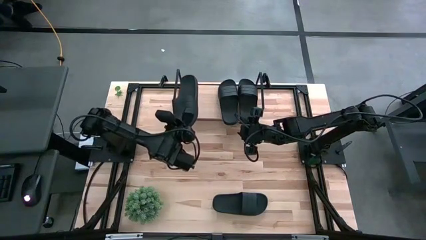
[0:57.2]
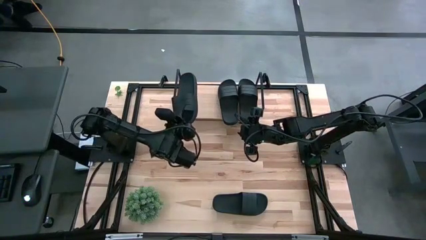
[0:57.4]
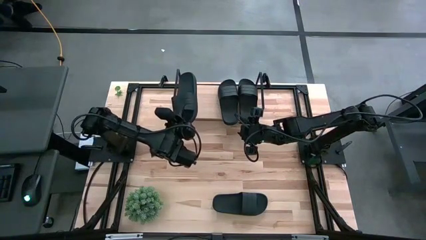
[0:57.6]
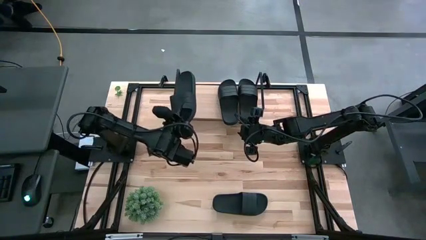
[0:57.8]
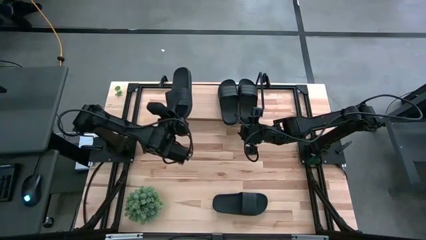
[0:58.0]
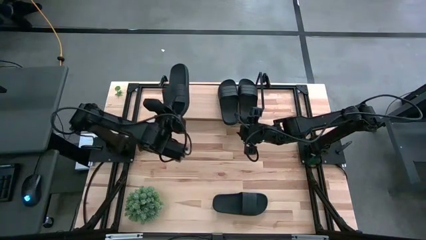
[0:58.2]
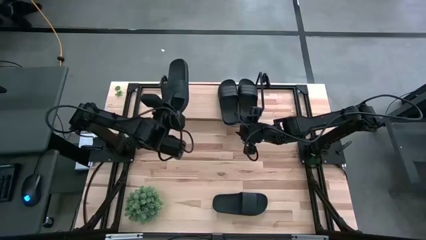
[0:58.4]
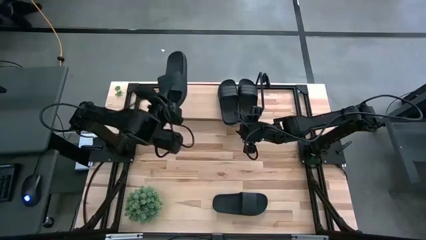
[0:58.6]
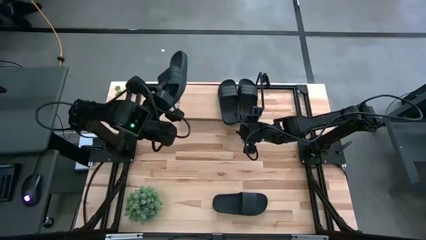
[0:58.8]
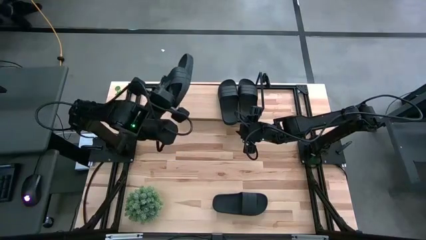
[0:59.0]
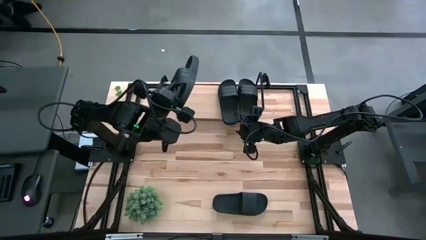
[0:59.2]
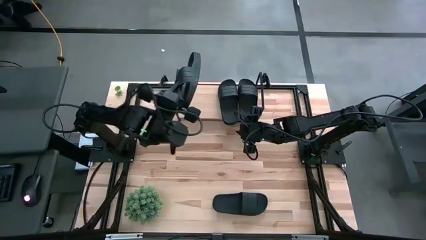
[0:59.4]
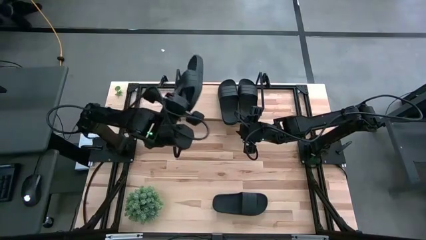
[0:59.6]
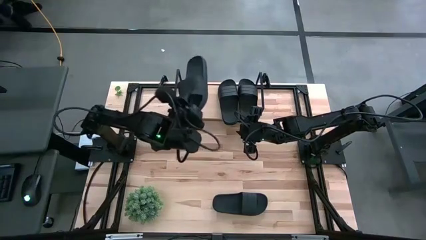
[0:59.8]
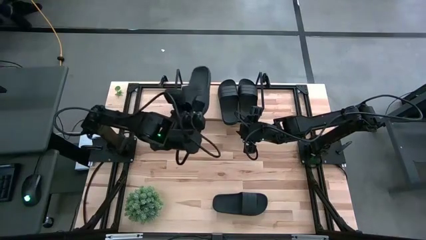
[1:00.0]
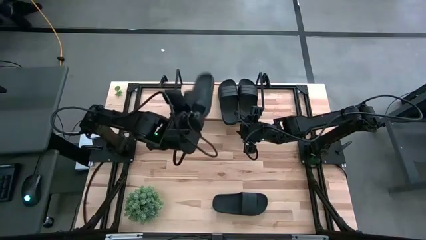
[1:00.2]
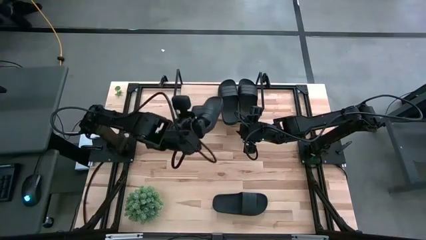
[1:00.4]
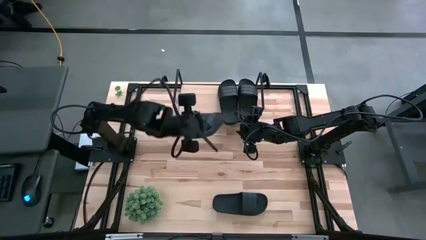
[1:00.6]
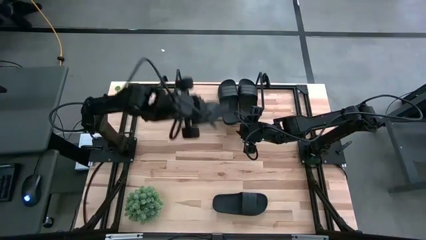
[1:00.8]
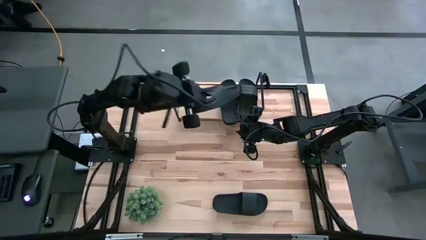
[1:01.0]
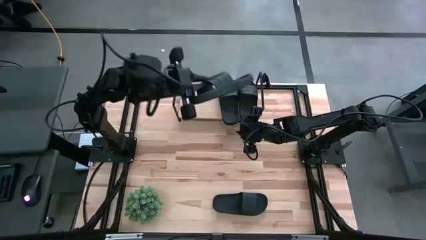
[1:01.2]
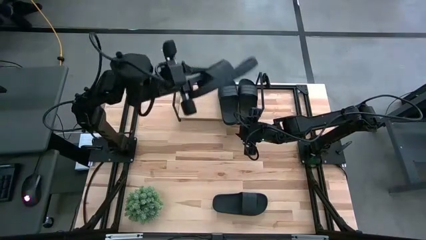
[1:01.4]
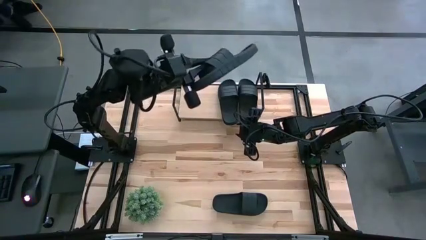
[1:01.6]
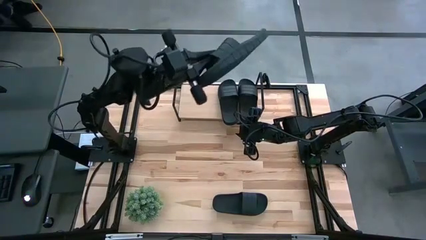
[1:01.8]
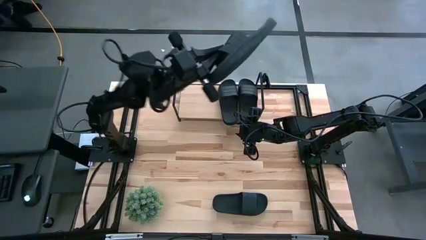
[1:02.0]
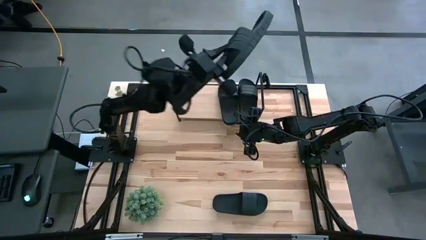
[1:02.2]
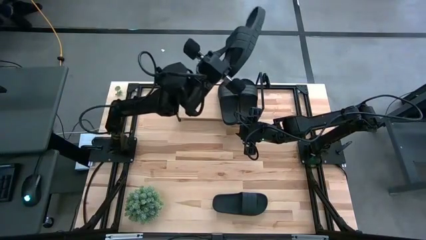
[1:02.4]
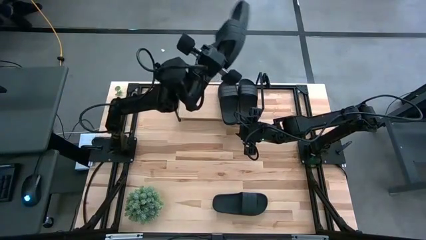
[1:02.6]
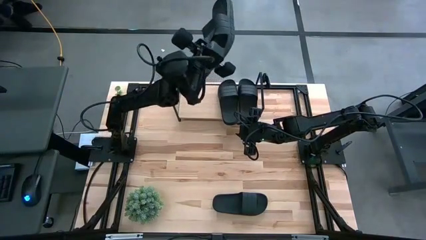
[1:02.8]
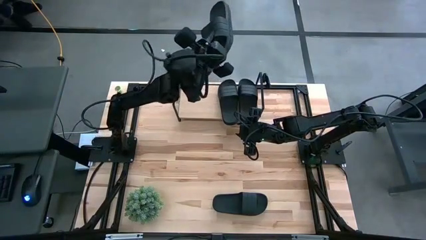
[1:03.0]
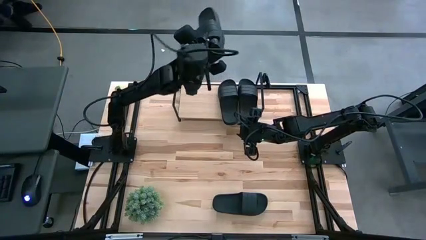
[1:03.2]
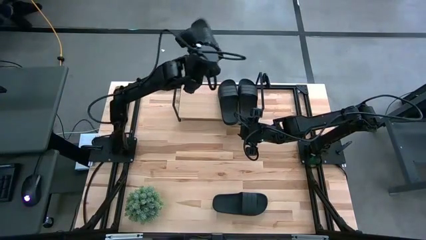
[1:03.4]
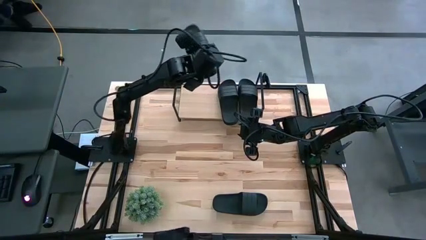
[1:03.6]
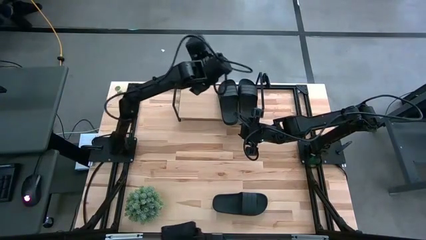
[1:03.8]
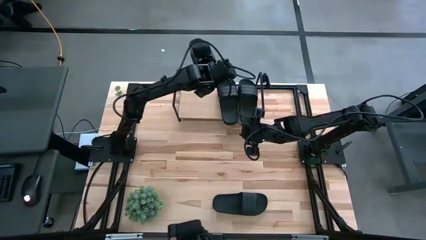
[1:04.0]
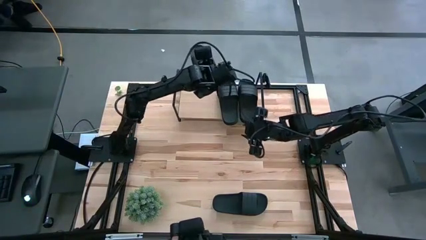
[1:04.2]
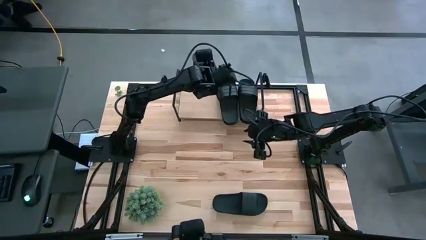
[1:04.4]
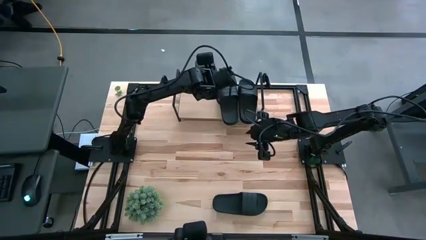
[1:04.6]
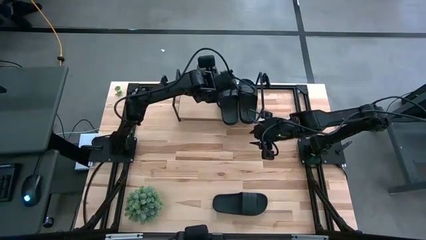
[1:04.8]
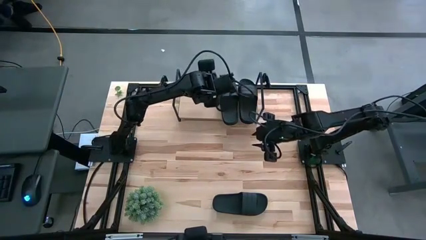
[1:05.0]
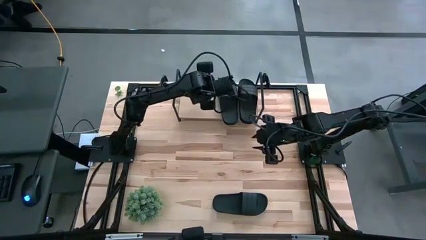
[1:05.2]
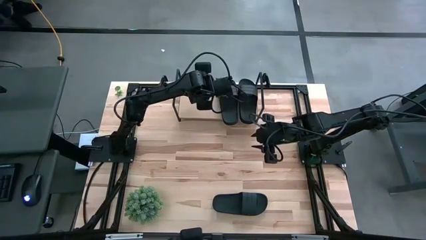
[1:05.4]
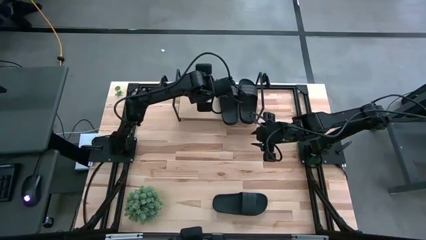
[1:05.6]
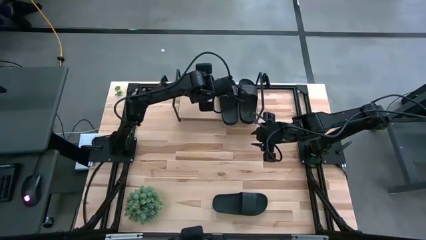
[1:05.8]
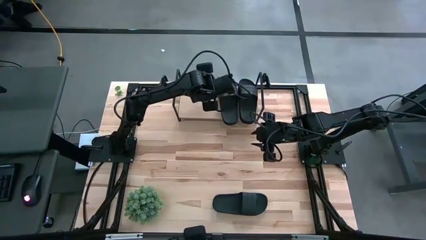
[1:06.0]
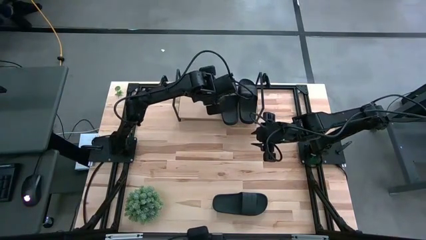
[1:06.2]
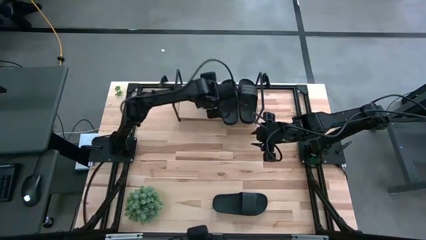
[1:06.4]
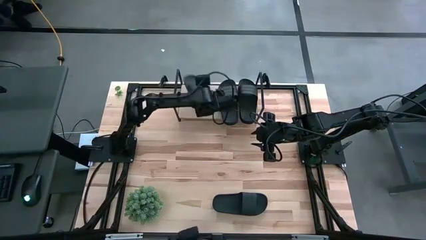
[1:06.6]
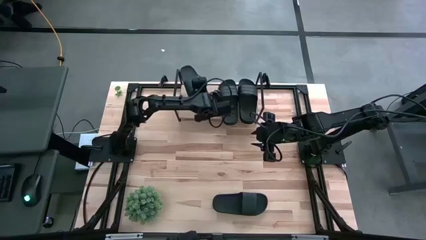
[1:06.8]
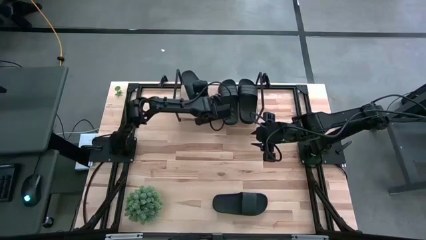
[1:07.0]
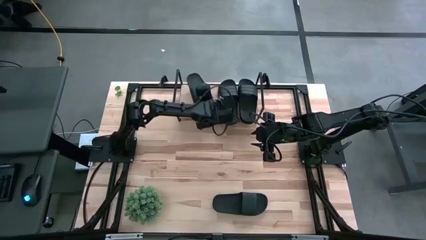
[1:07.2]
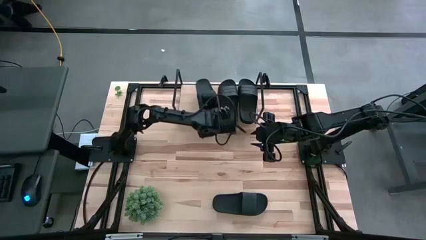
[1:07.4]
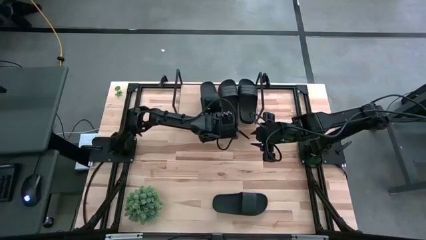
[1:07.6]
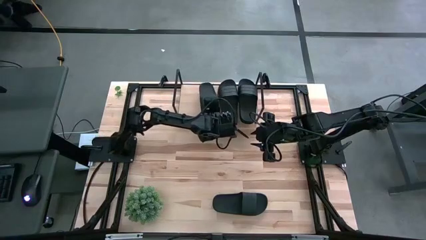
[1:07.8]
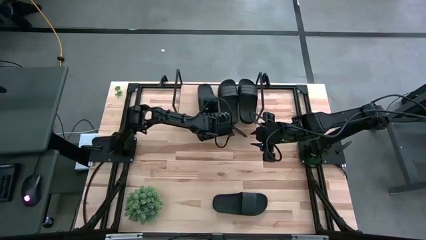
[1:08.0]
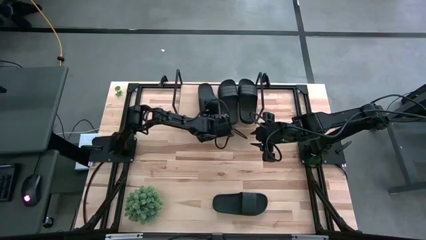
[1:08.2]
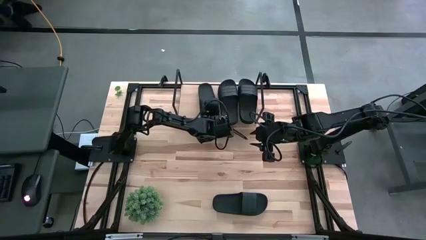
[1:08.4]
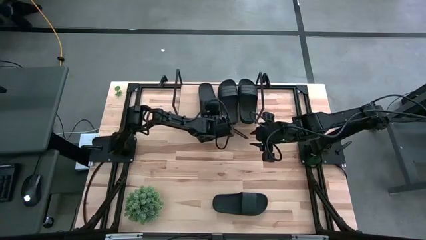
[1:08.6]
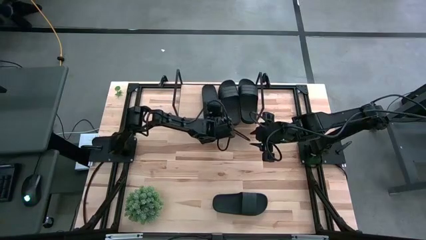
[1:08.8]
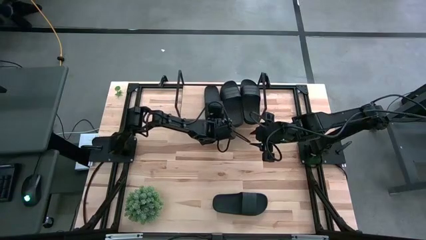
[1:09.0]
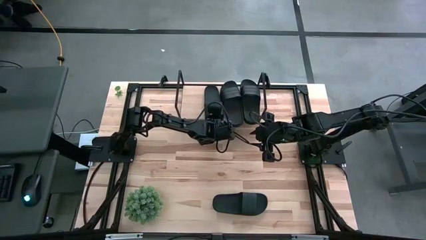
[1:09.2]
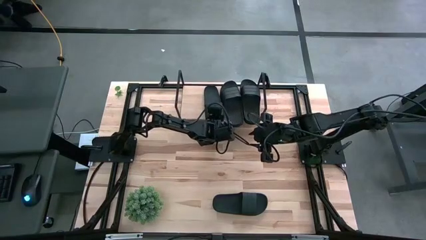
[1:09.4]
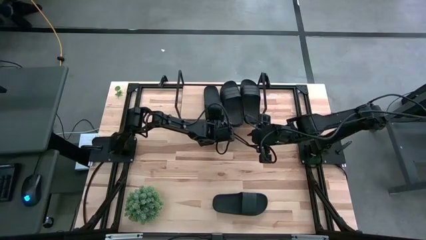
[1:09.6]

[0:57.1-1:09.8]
Task: Pick and place slides into the shelf
Put the left black slipper on the shelf

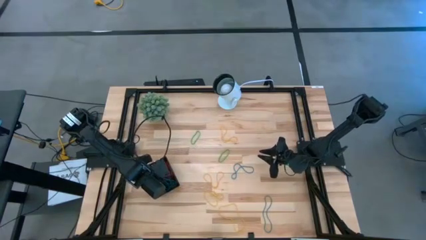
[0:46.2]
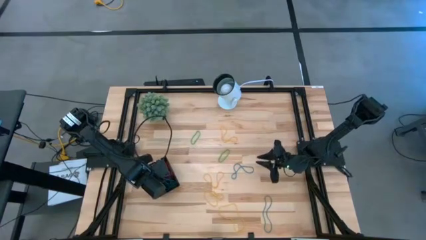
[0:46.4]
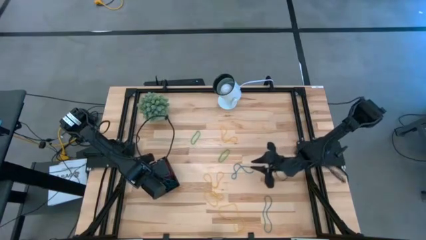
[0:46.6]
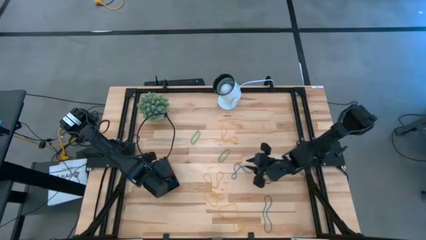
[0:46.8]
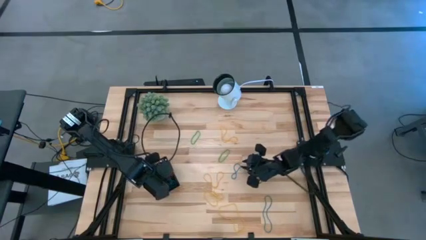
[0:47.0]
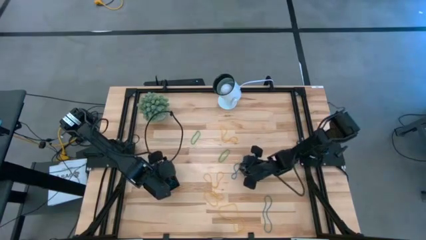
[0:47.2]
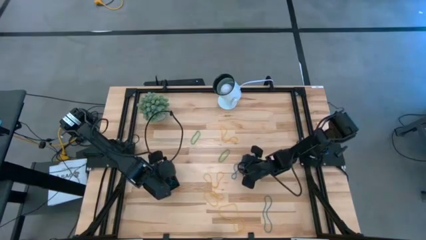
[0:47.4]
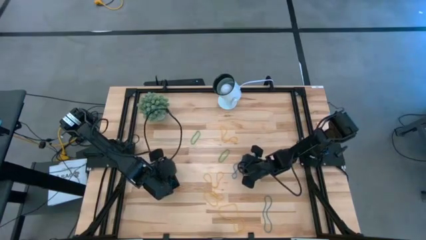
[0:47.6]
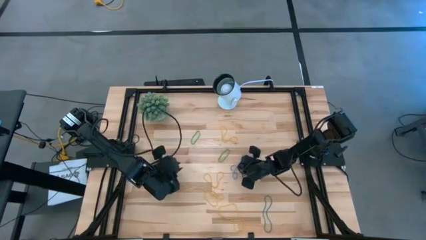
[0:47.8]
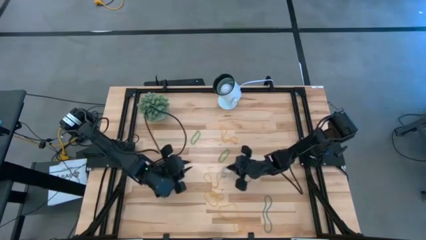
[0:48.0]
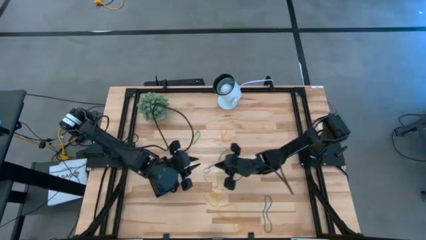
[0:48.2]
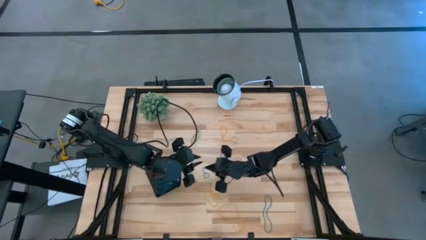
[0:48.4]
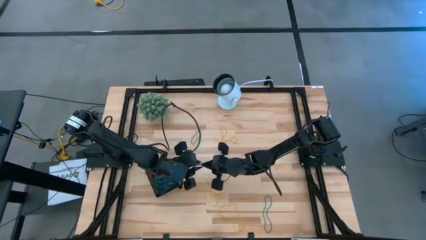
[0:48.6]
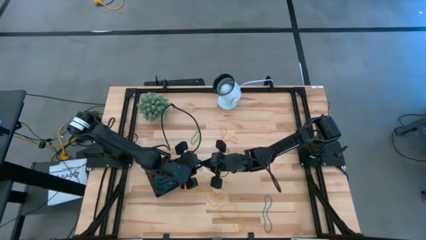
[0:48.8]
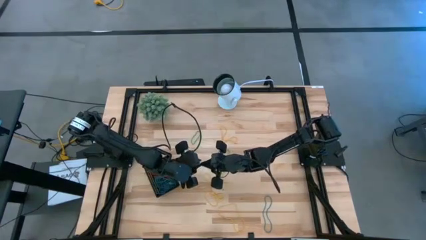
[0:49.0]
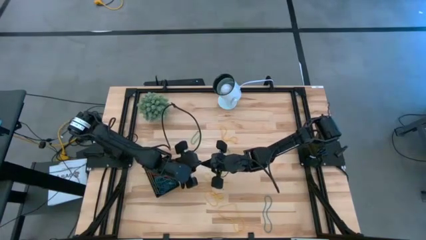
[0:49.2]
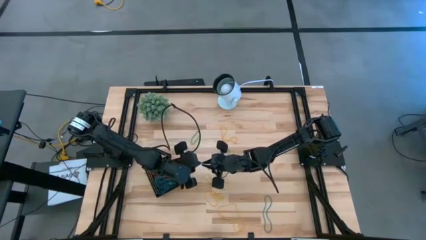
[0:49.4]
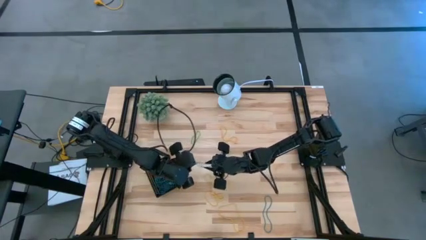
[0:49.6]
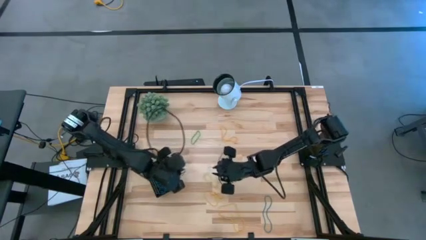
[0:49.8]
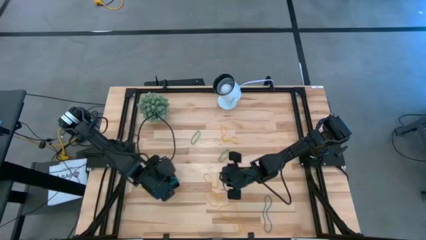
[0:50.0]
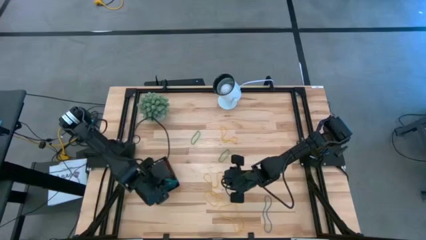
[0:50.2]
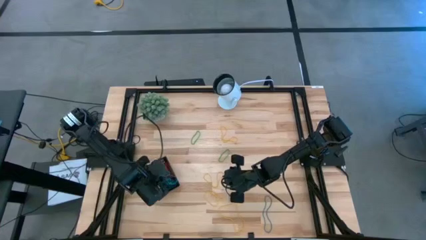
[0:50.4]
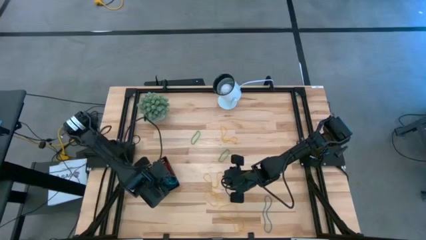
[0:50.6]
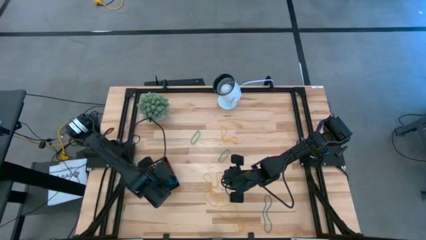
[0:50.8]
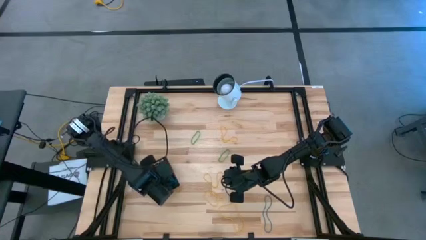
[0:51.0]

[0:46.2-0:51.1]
Task: Pick and place items into bin
Put the blue rubber band into the black bin
